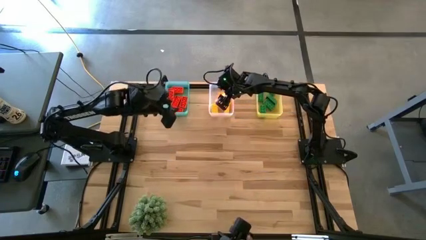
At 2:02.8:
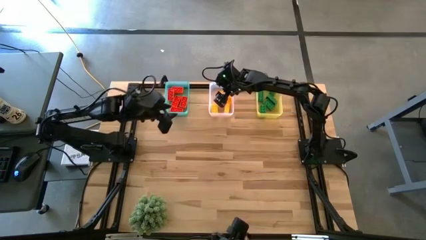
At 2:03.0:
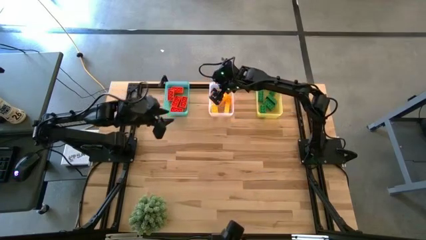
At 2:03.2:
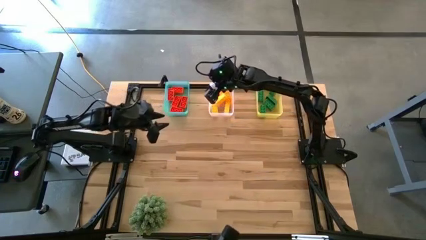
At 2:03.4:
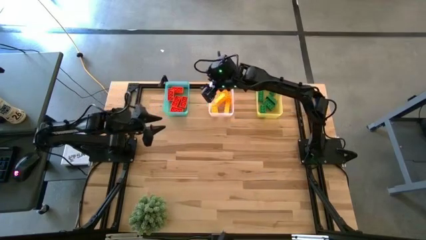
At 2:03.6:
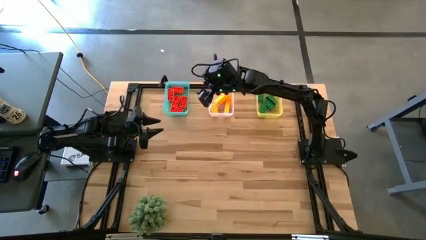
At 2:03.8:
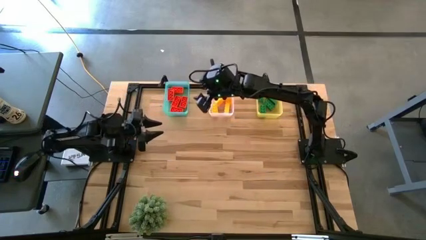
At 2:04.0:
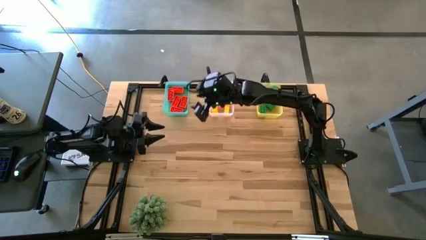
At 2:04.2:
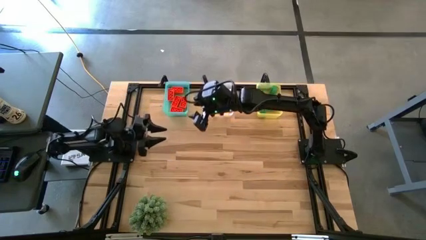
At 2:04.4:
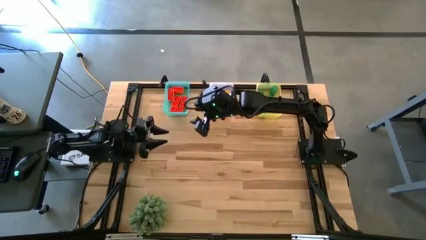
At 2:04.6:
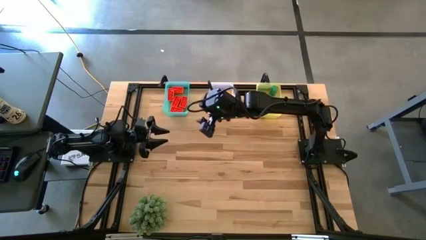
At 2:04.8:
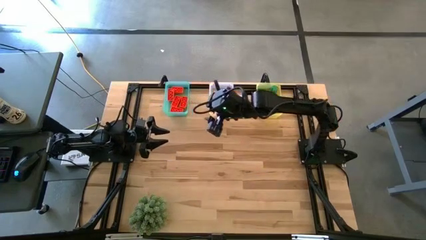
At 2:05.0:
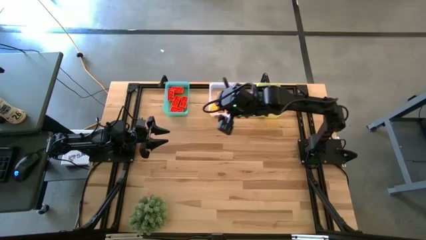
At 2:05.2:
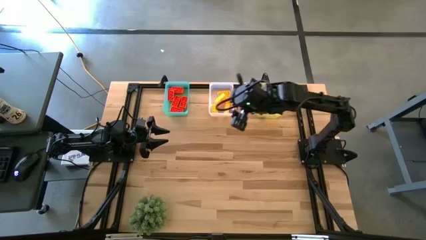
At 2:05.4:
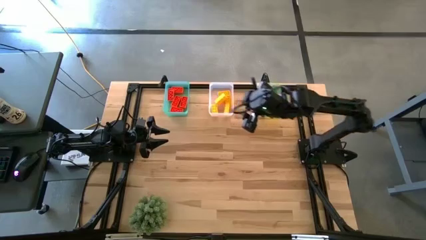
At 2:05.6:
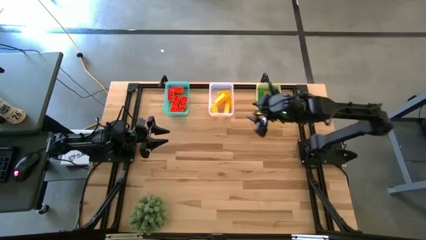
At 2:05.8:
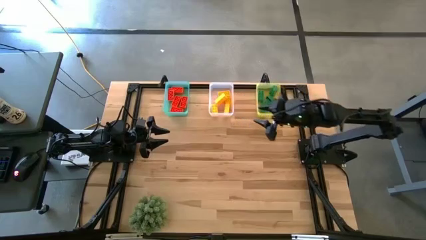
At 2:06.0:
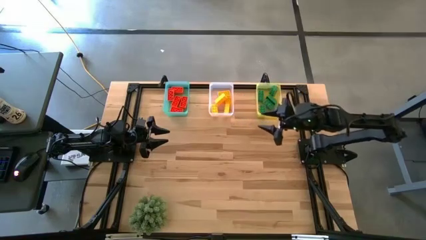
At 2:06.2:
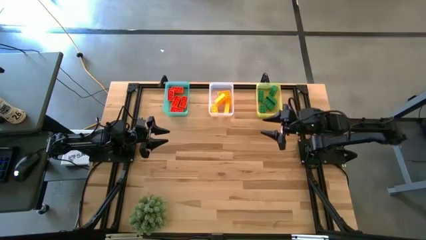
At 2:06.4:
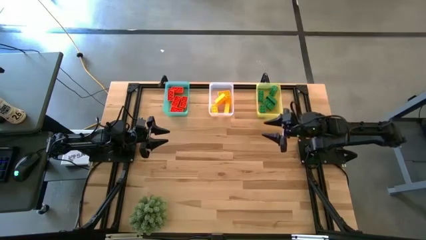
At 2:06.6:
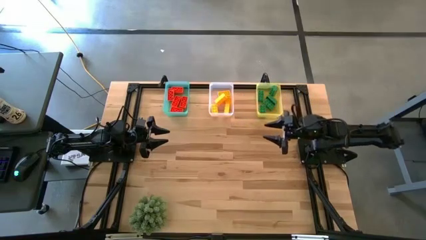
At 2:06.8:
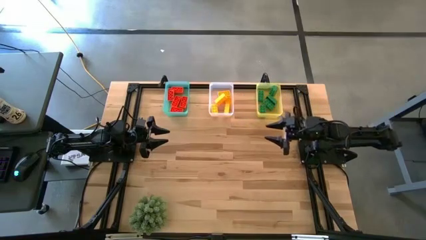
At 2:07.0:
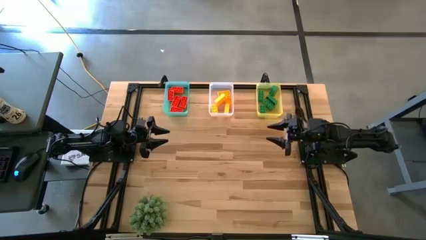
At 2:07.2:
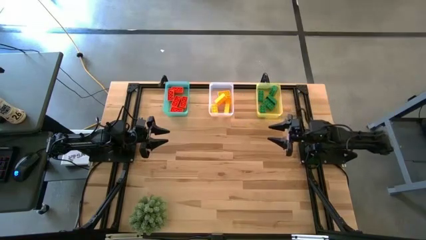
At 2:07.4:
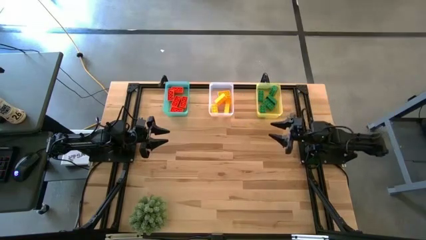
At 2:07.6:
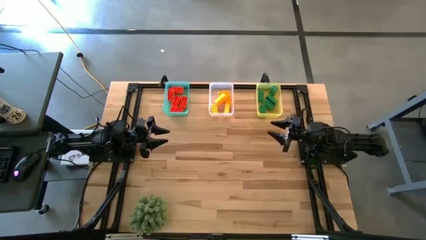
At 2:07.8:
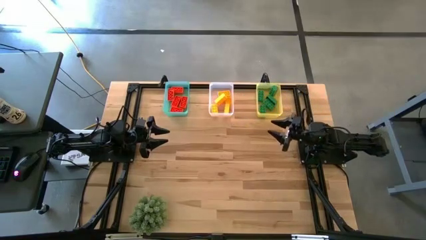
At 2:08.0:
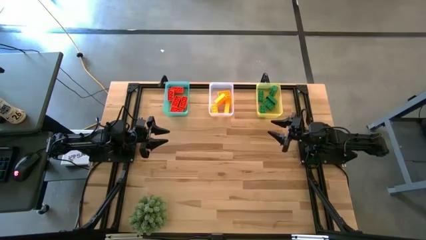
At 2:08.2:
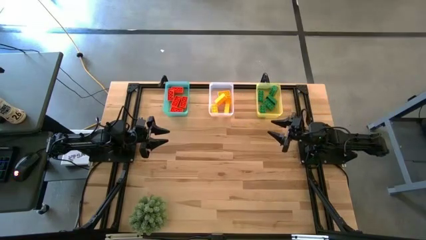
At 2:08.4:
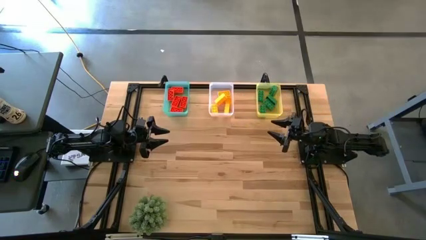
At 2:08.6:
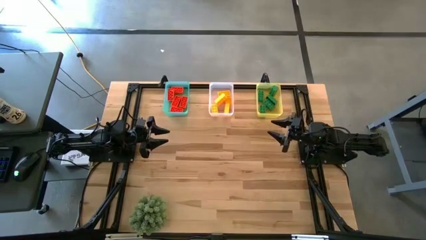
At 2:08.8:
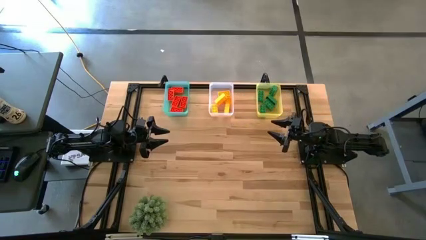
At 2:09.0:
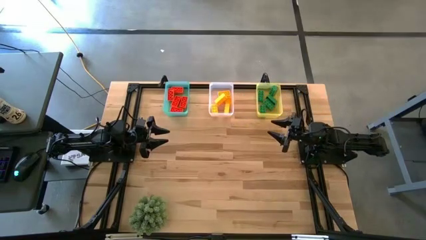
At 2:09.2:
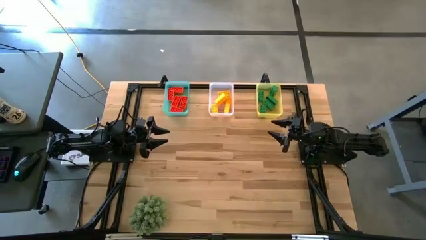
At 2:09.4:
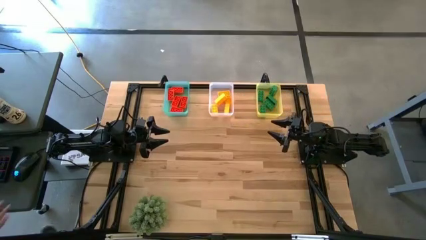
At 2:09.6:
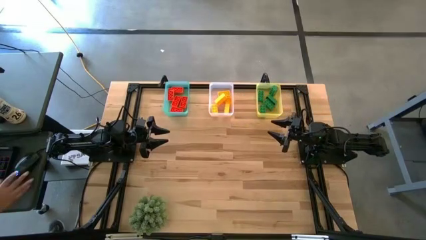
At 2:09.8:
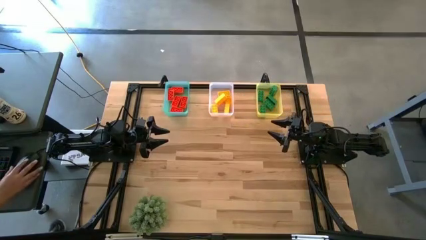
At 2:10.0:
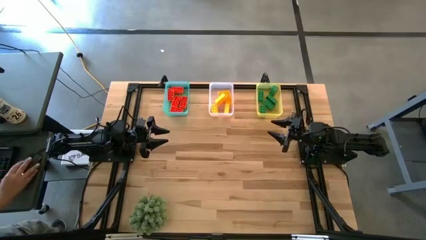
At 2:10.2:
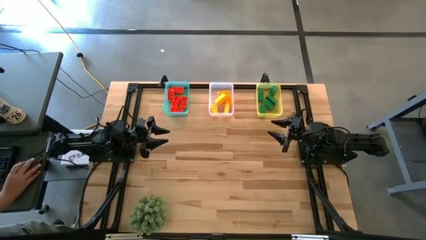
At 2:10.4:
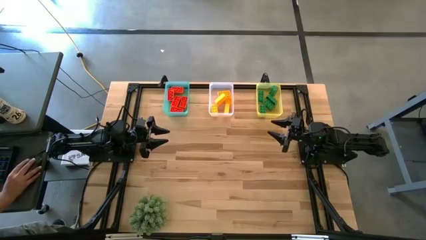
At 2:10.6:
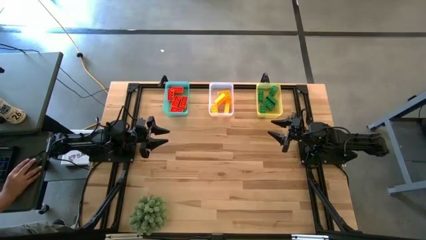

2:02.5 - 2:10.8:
Task: Sort & place blocks by color
Return to Home Position

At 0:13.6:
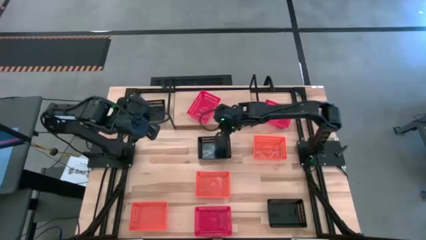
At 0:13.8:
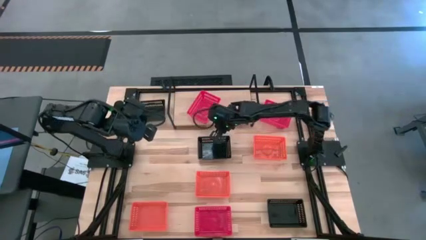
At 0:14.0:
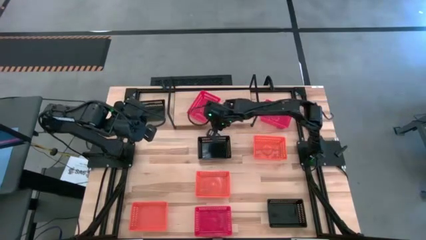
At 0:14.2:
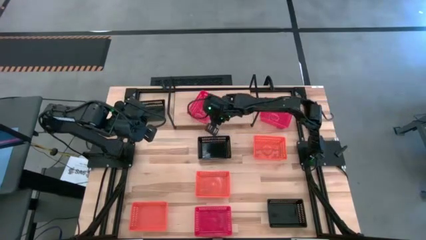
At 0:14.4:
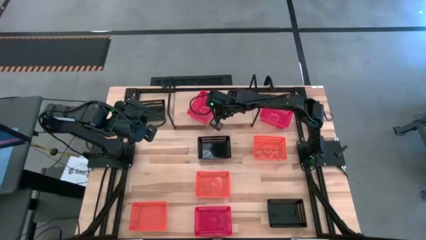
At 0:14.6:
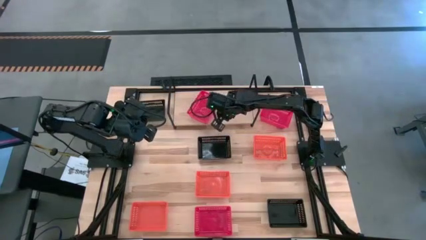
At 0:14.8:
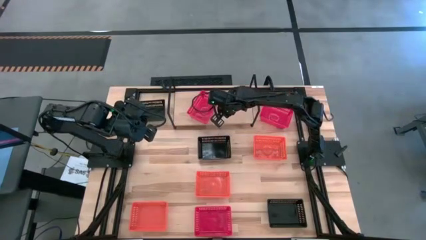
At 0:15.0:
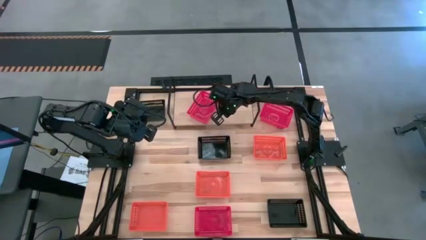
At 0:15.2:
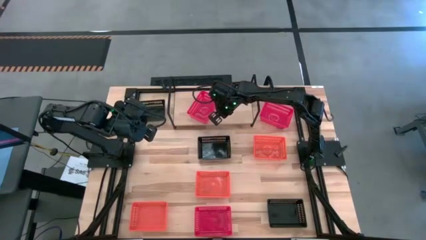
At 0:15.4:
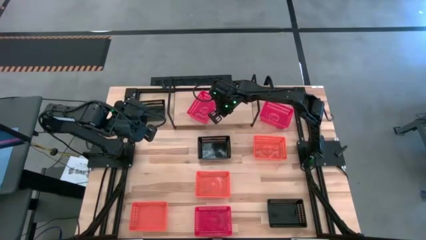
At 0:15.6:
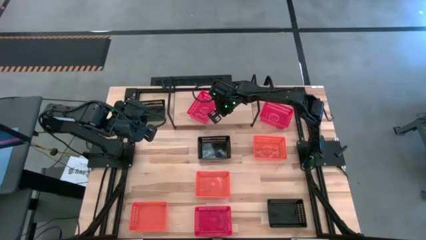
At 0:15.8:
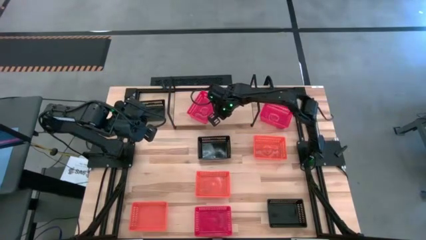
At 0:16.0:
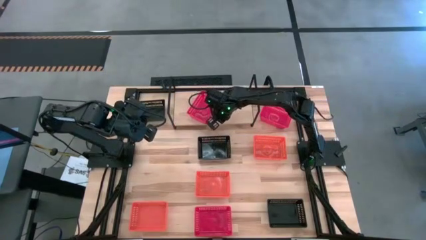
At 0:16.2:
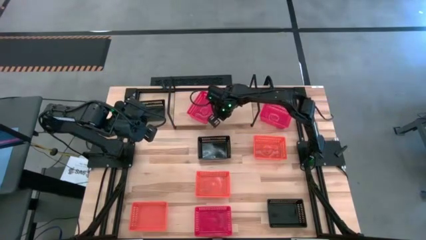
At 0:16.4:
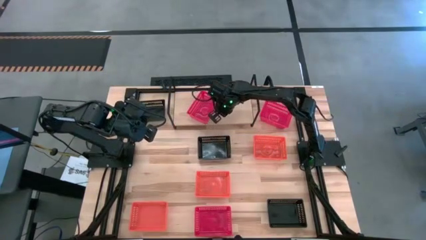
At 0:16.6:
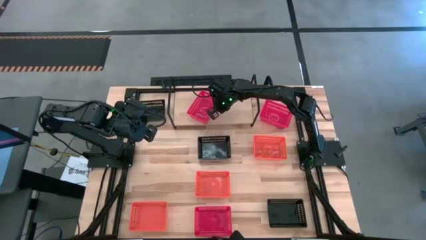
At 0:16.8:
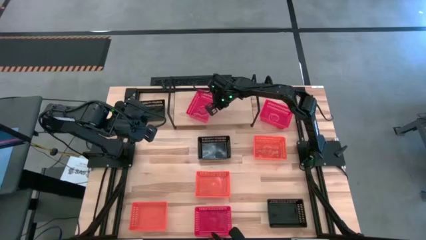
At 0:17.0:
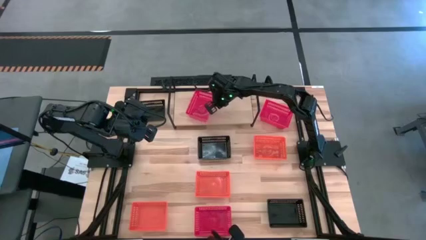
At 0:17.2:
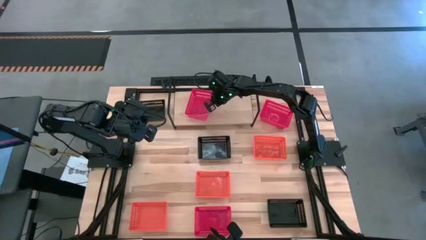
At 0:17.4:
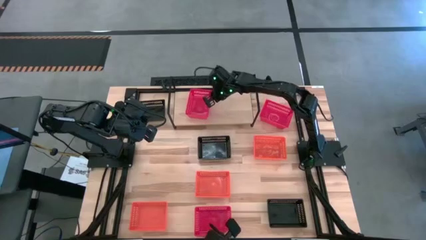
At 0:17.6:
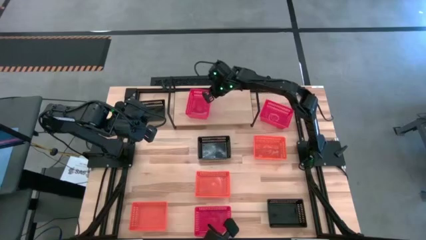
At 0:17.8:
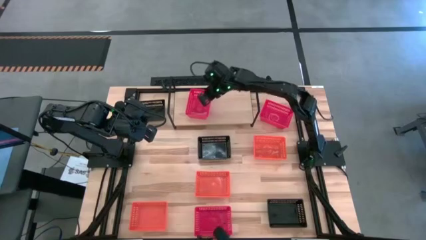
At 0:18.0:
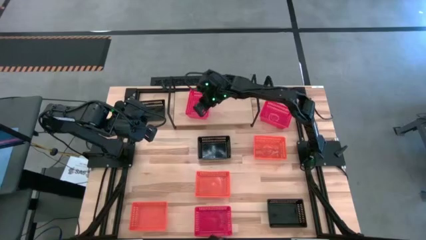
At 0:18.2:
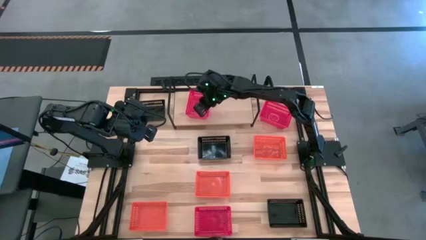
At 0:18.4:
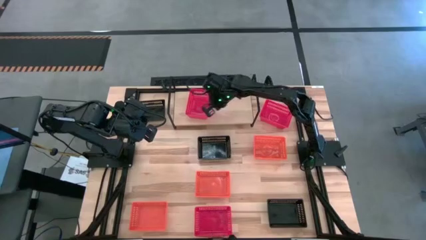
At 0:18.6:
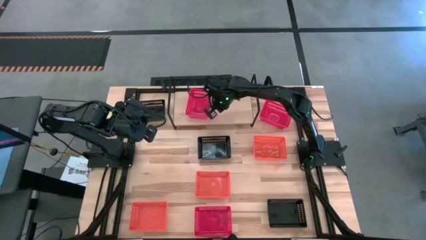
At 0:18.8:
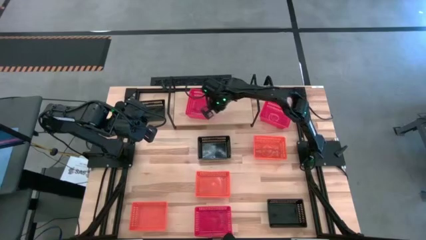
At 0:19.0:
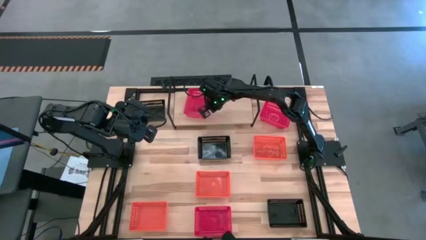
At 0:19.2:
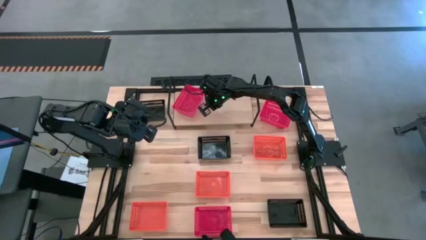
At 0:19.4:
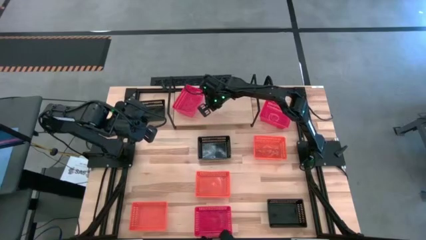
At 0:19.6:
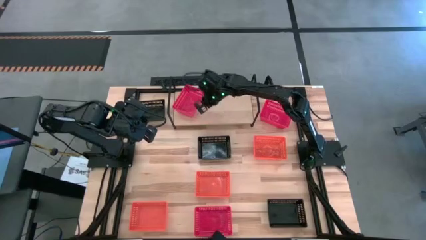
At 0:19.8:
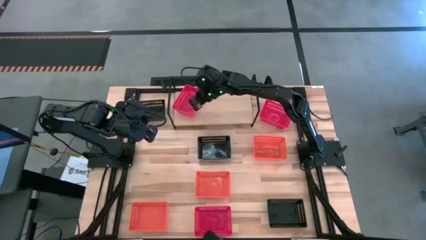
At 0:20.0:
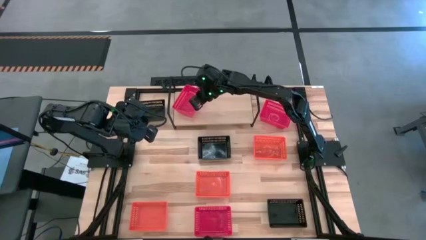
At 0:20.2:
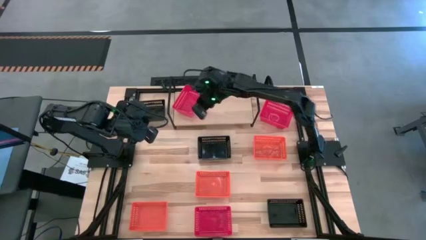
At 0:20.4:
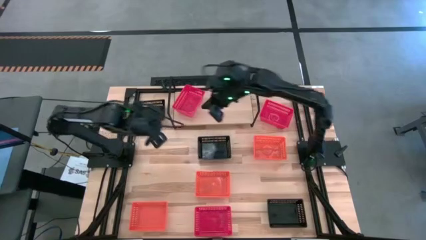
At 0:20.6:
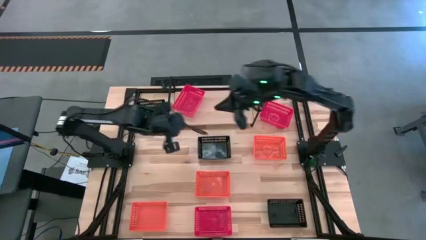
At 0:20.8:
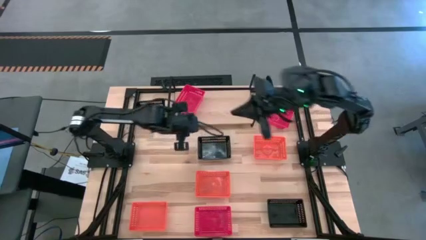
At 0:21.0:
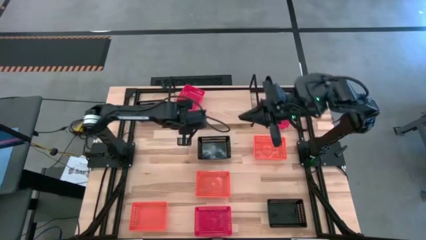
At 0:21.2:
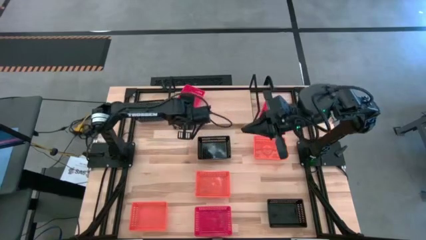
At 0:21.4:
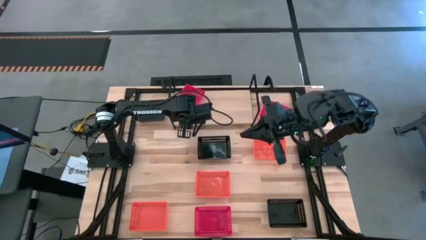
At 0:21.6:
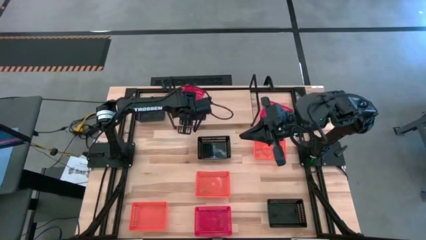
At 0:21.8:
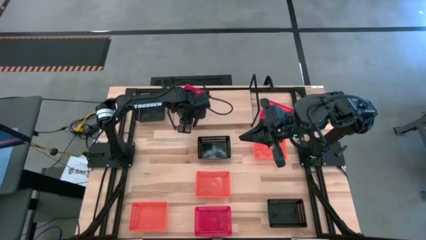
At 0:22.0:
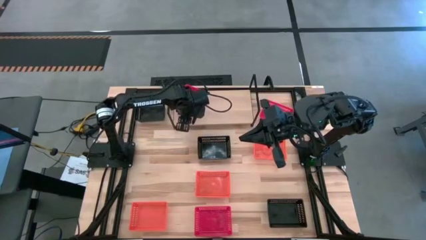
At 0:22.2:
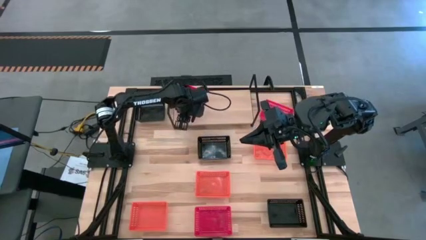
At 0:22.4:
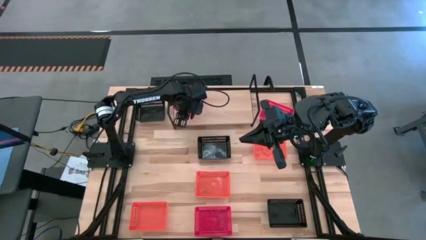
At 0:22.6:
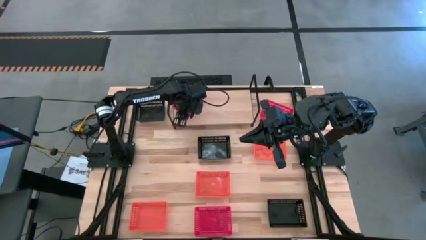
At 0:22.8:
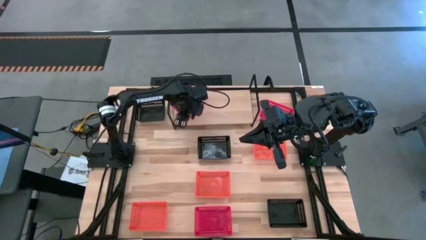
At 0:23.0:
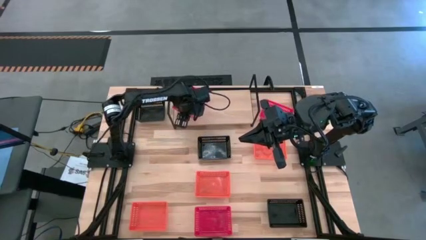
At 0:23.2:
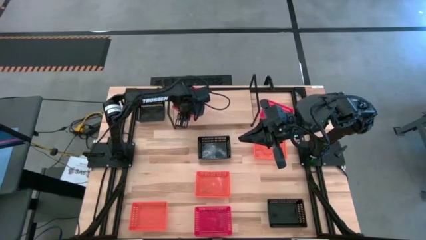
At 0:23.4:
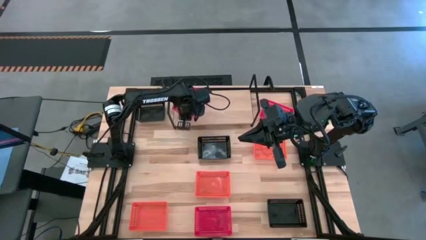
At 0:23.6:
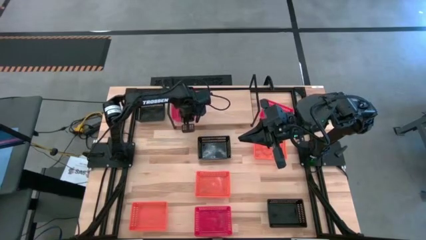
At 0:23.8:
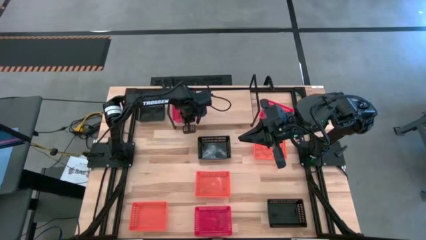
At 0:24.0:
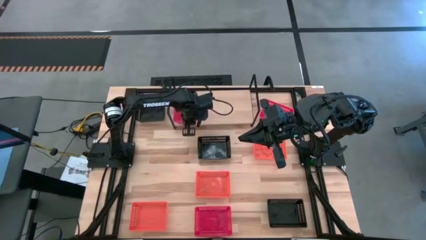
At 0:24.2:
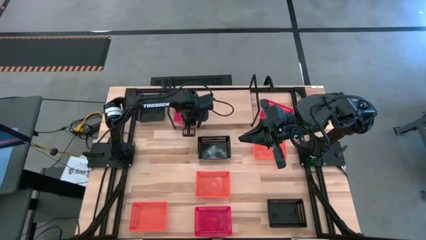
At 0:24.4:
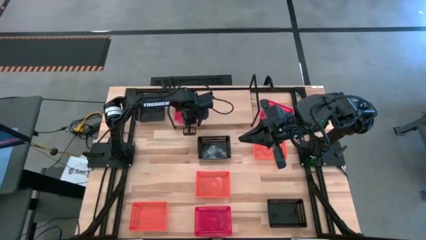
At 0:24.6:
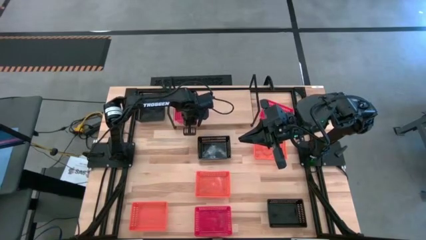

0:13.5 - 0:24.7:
Task: Stack baskets on shelf by color
Put the middle red bin on the shelf
